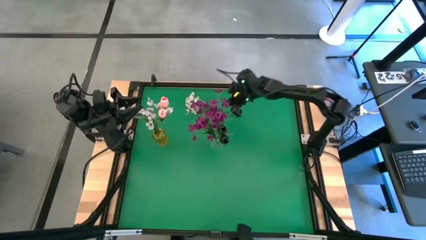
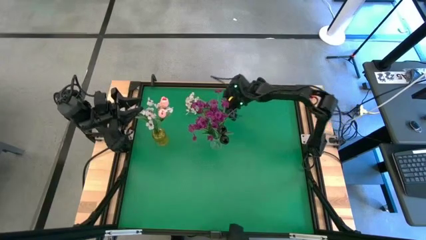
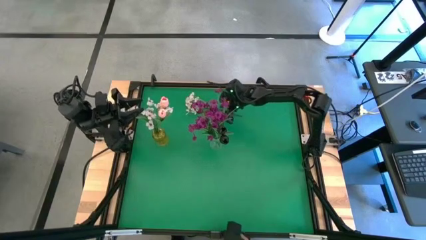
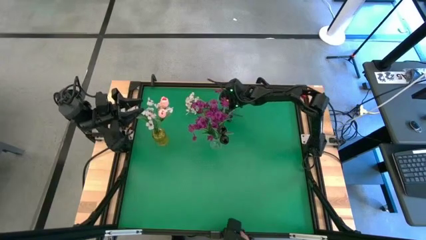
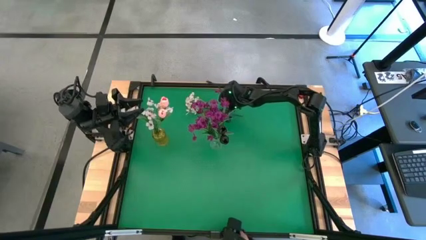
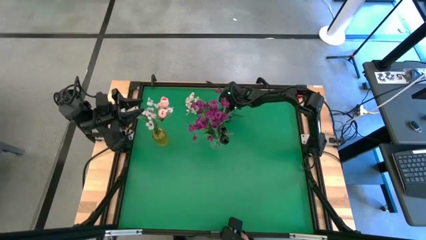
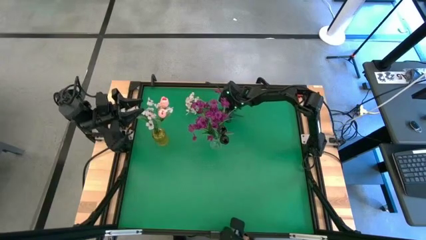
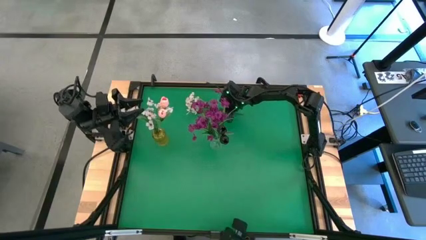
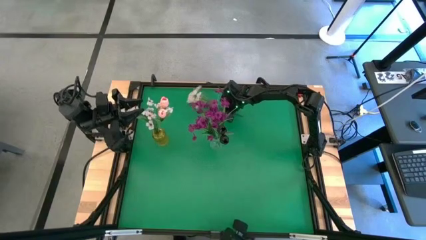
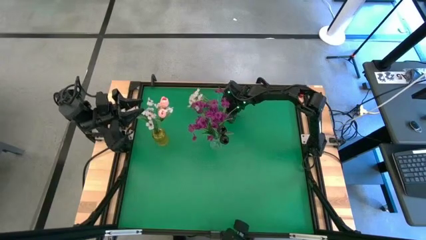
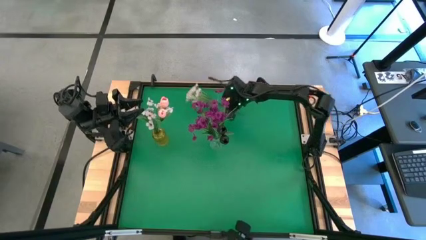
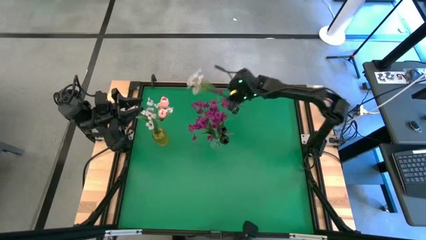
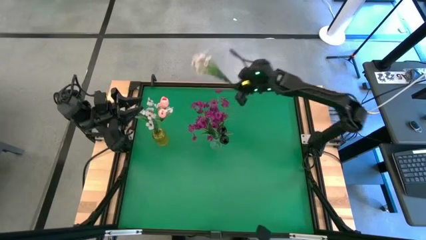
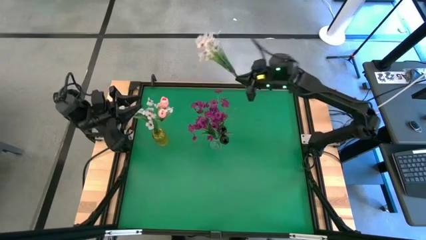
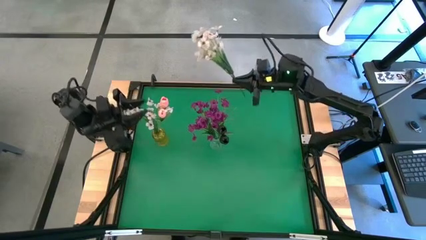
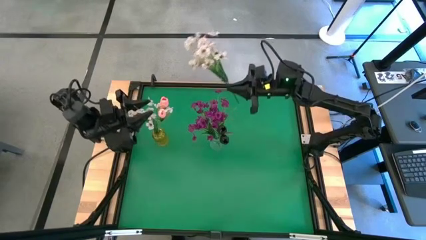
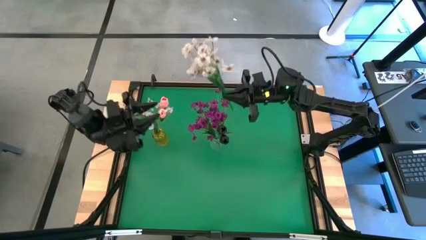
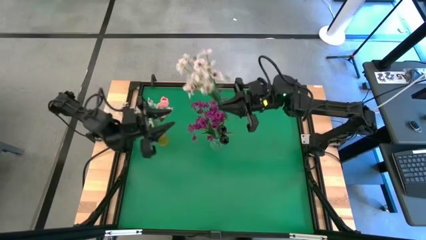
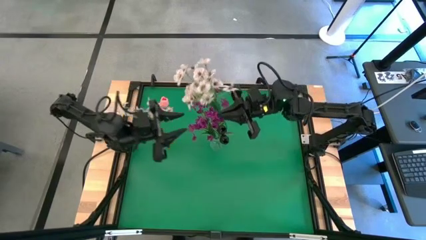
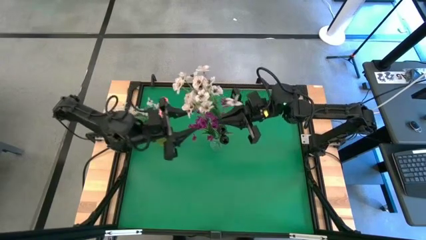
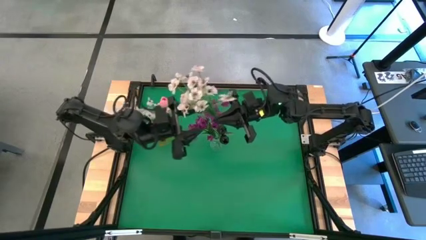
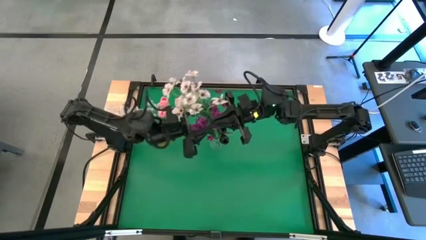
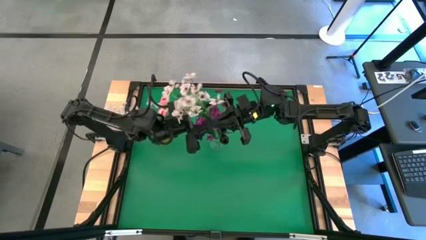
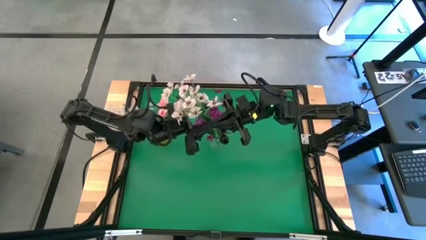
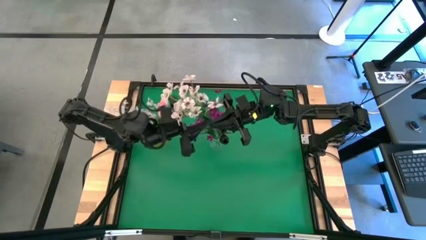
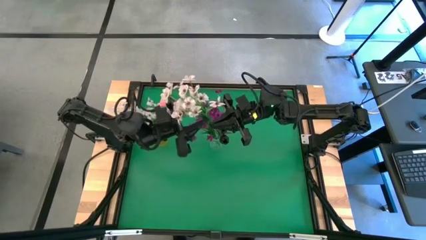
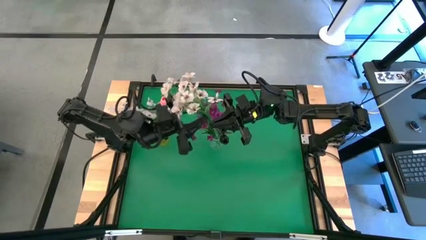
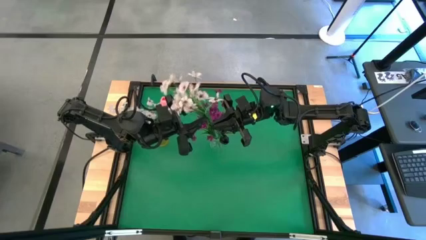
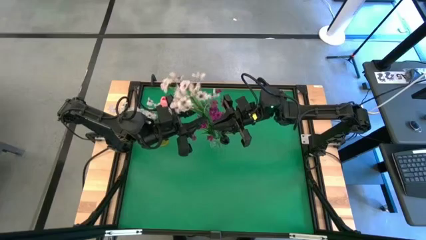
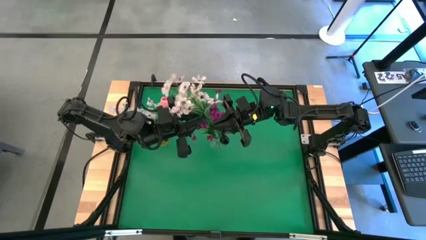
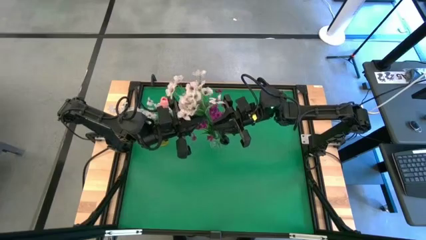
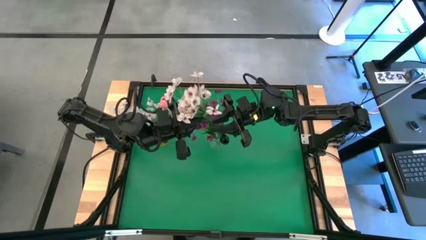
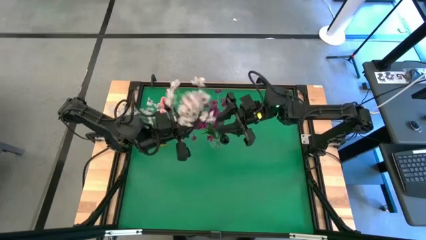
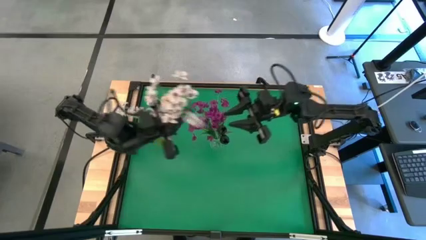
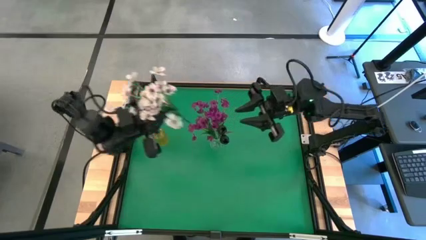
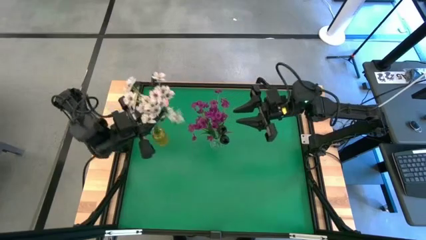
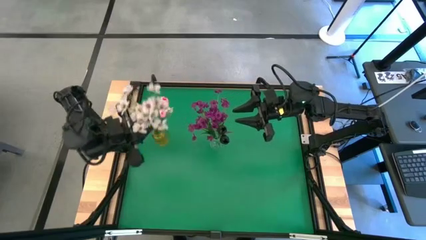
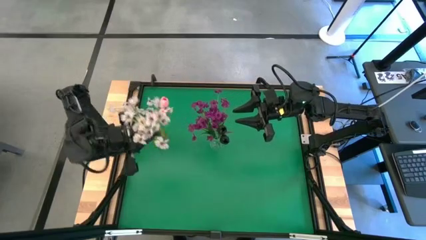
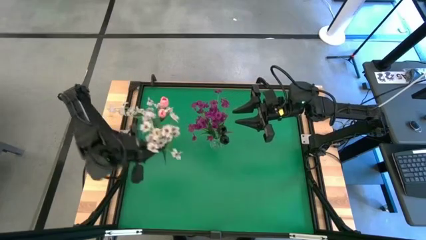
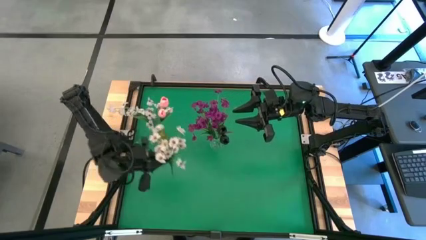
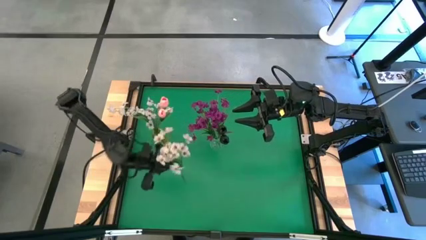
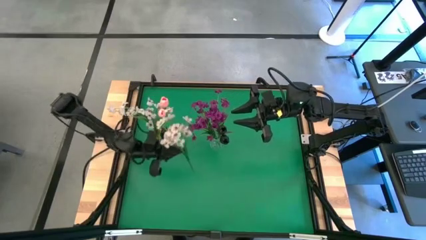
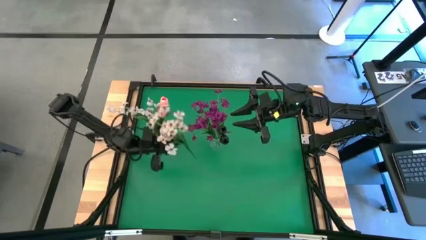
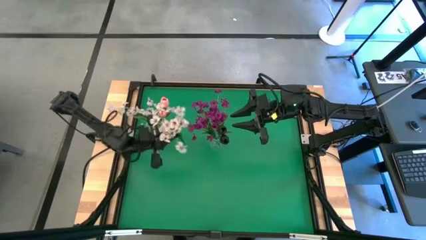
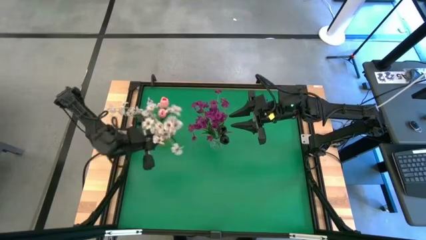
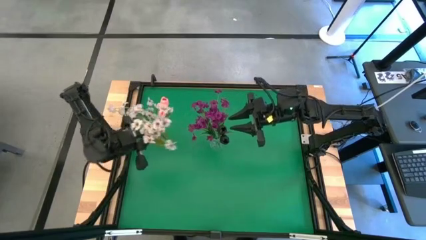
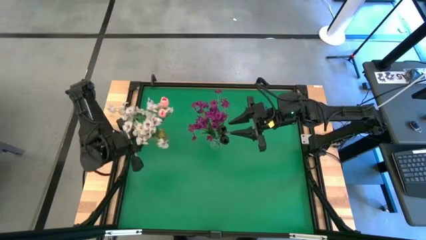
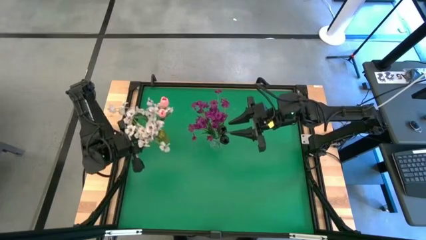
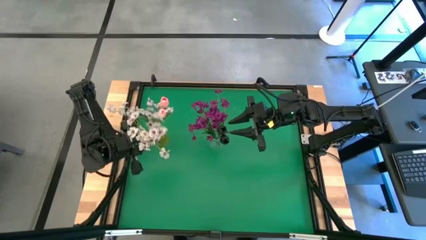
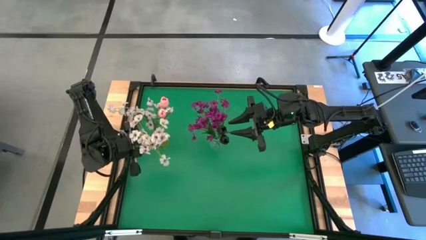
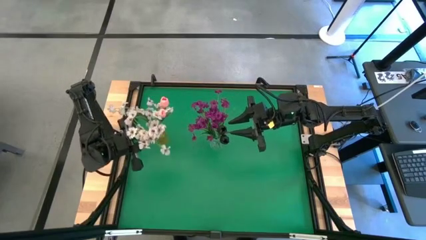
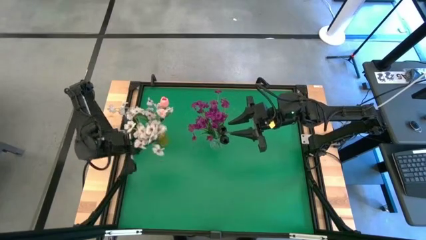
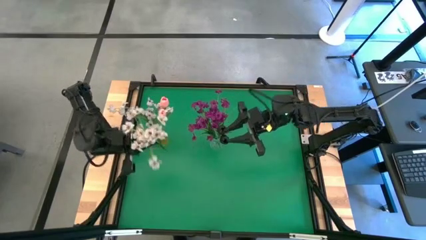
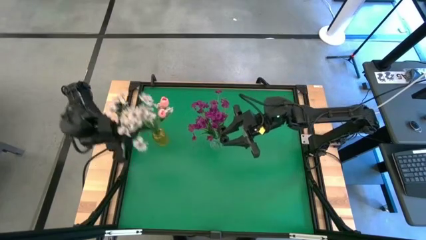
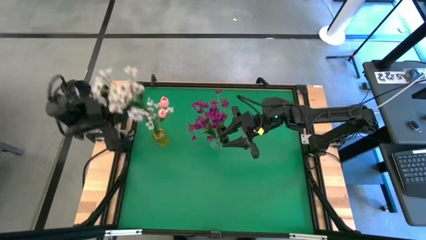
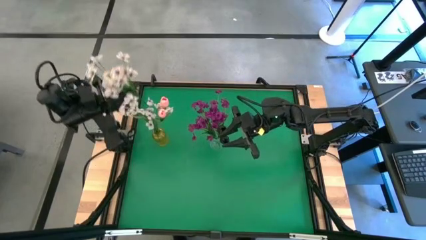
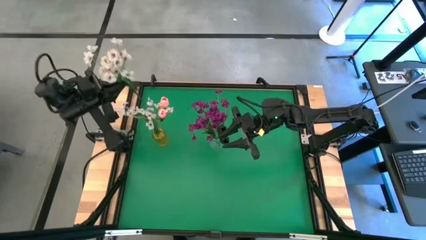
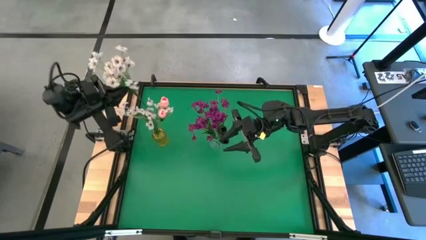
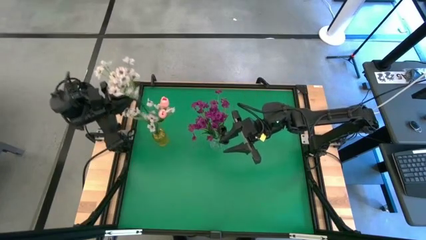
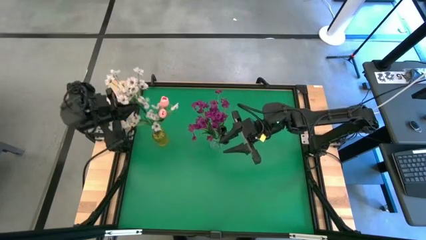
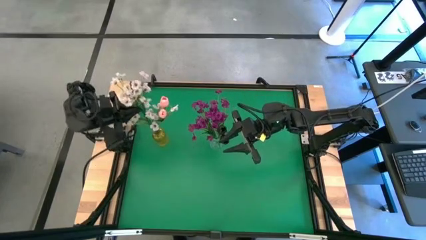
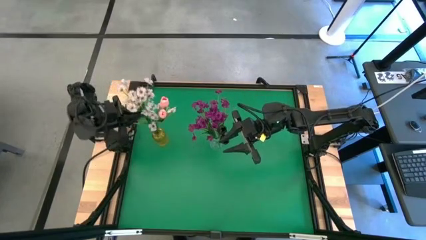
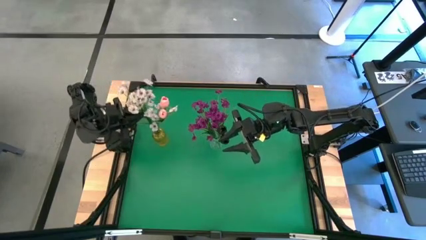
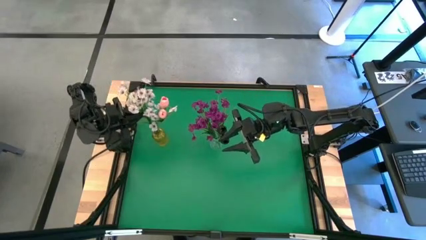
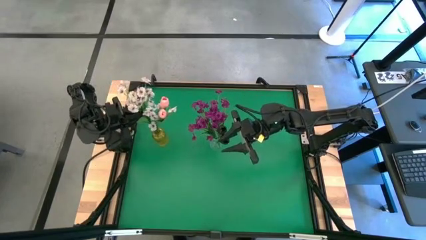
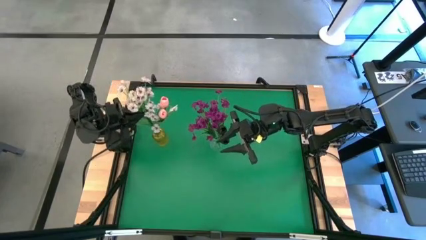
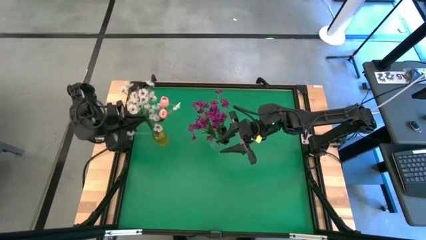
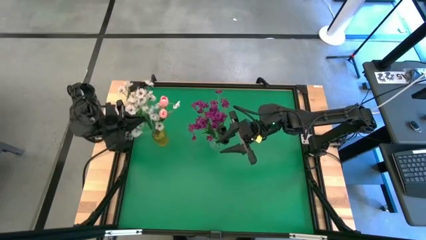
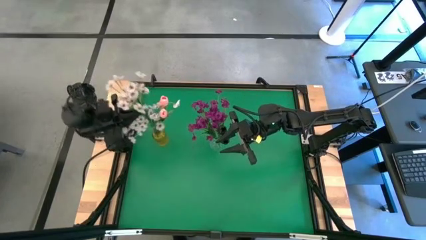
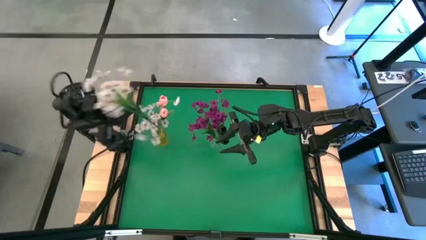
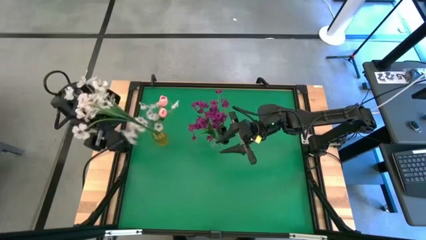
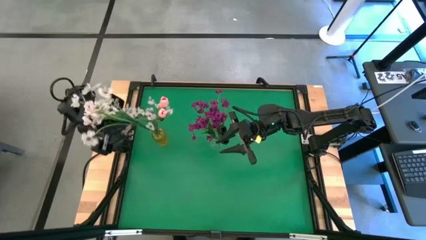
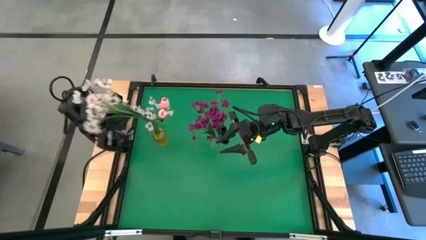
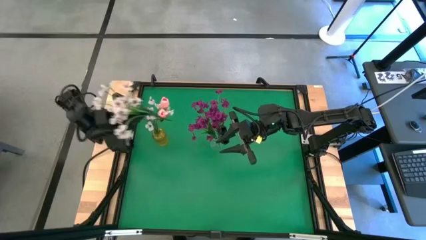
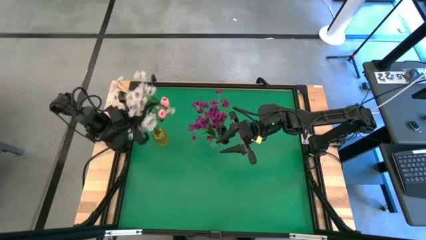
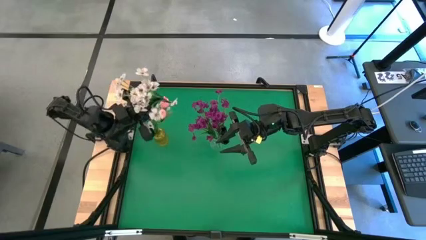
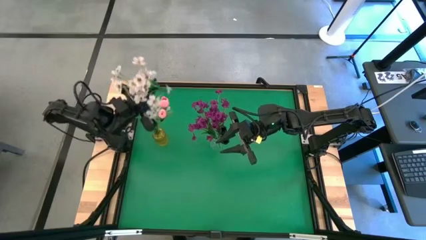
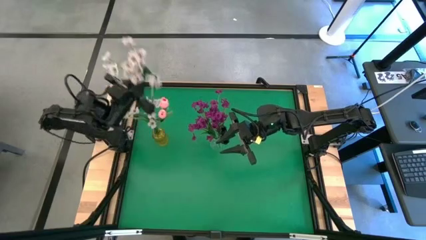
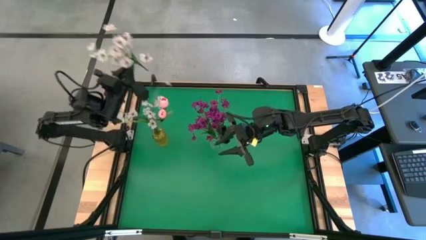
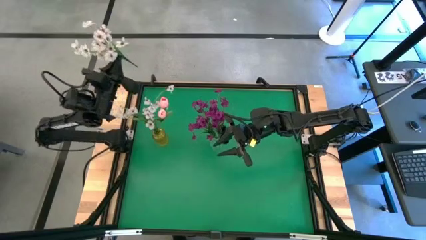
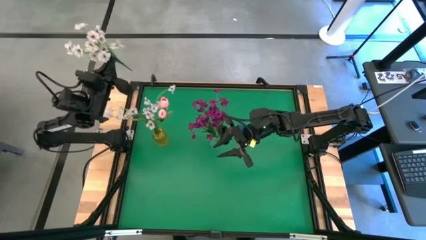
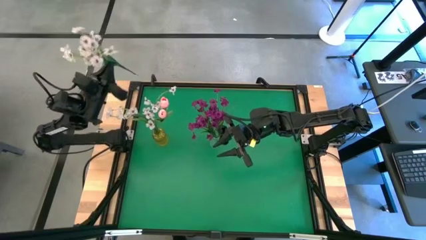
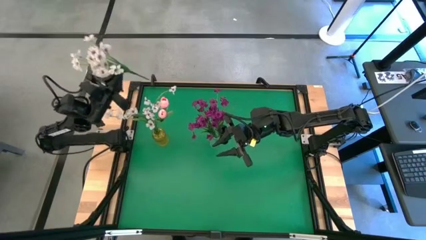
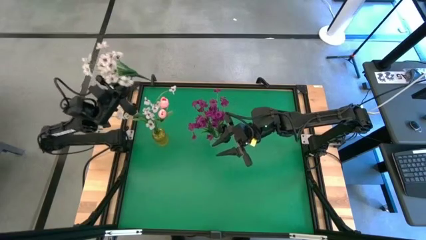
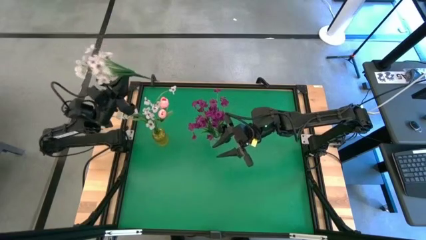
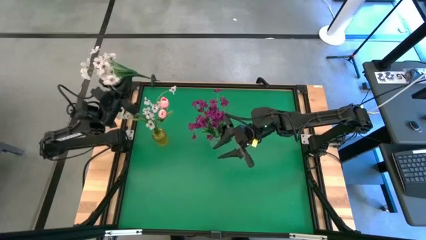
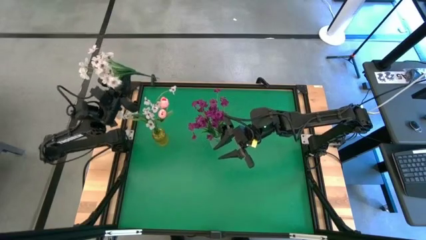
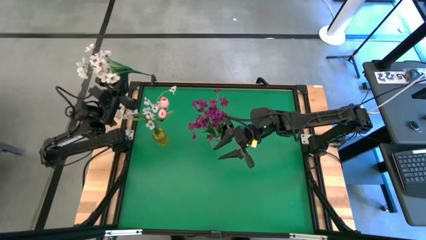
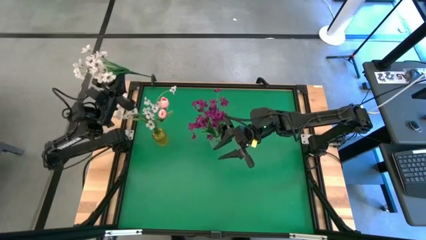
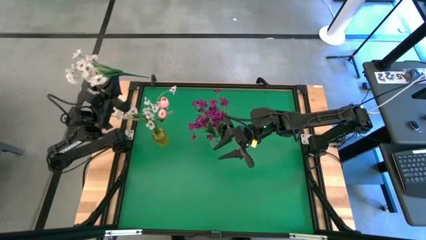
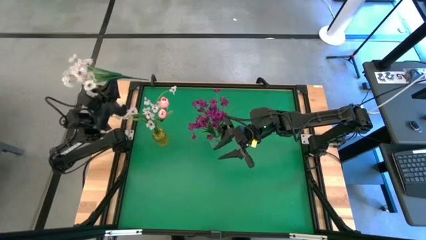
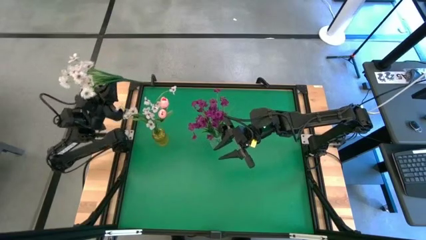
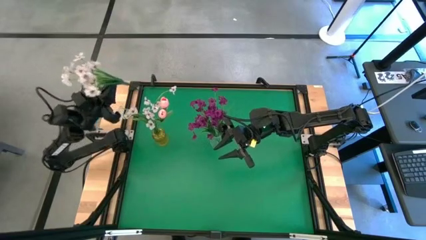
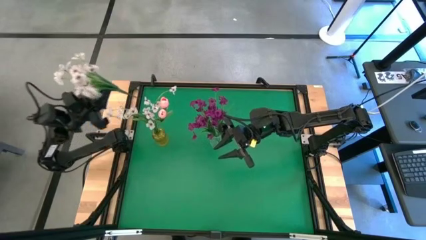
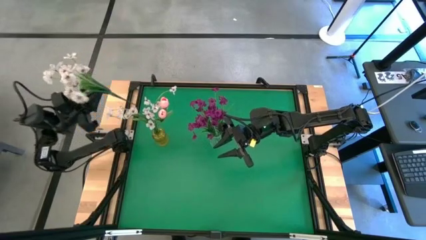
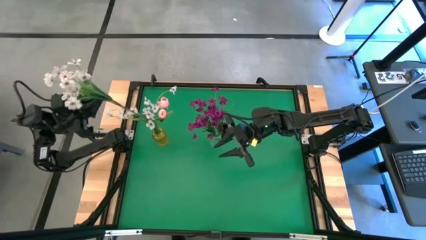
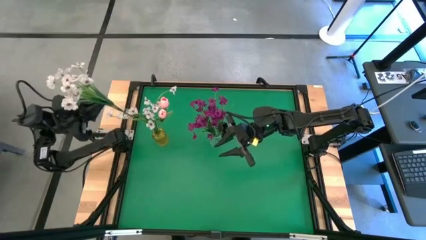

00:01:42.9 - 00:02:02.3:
Task: Sort flowers into vase by color
Put the white flowers into the yellow vase
